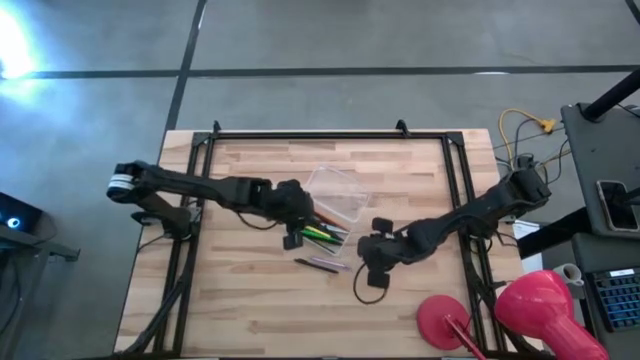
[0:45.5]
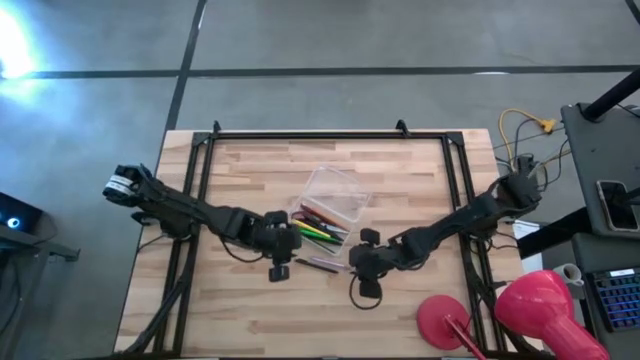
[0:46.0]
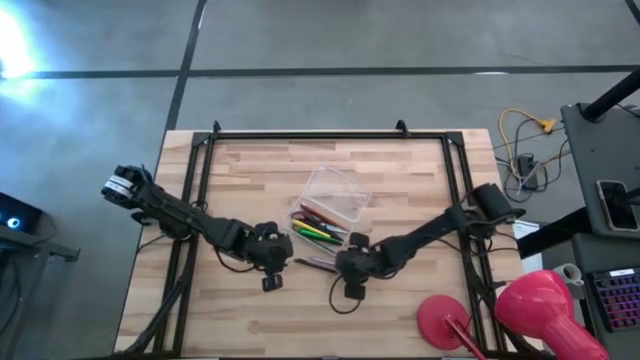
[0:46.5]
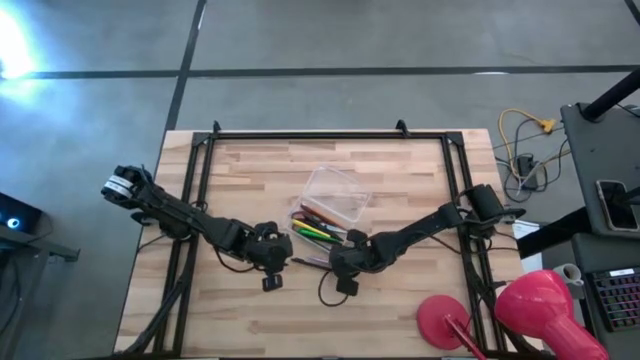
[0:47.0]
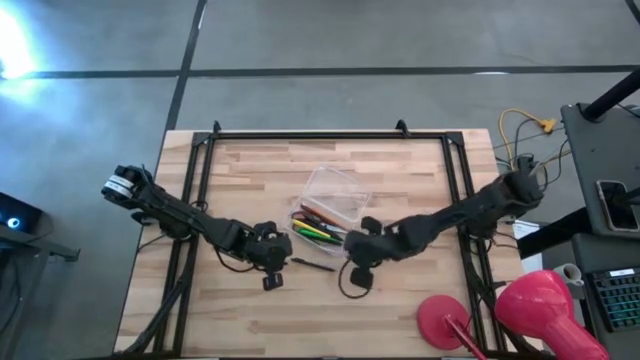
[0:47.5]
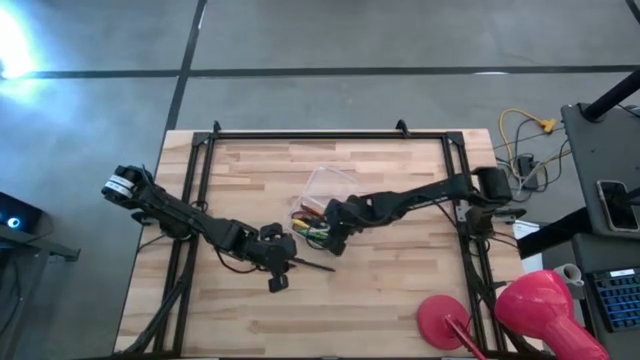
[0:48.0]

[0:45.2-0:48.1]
Task: Pick & place school supplies into a supply box
Put the purple pen into the transparent case

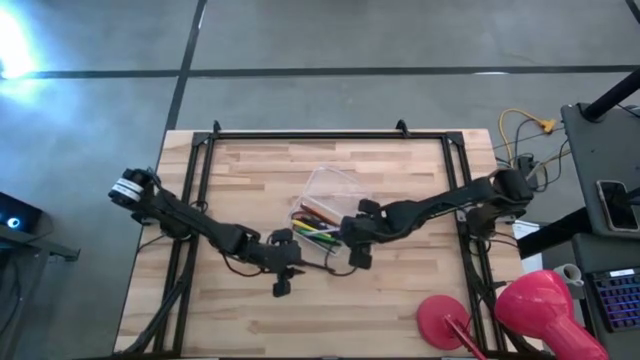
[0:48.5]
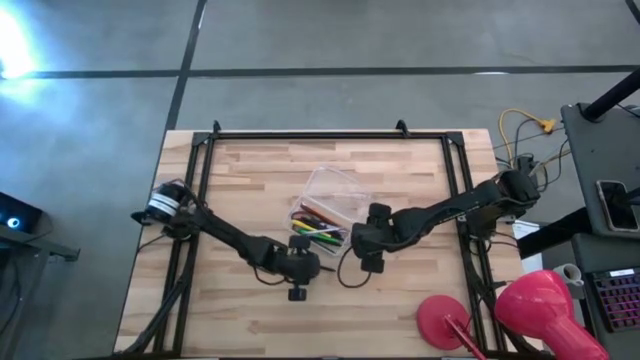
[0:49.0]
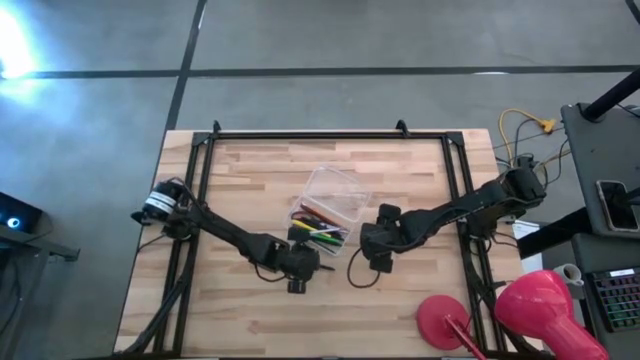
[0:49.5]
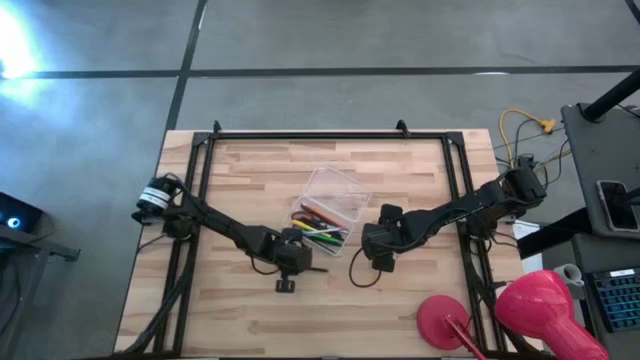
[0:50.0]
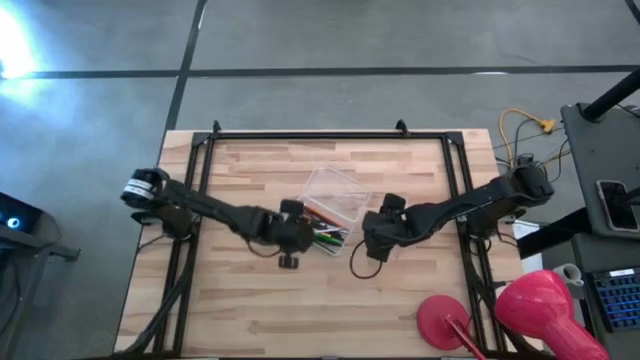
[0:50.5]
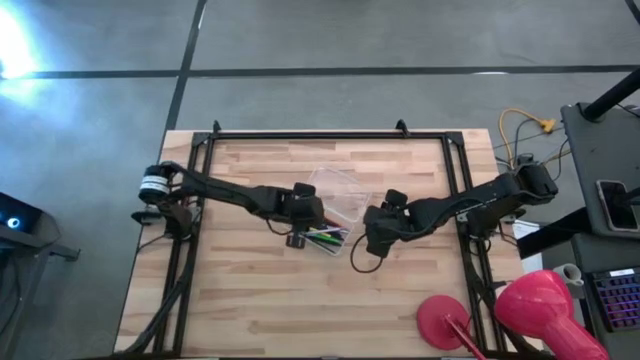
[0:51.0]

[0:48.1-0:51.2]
Put the black pen into the transparent case

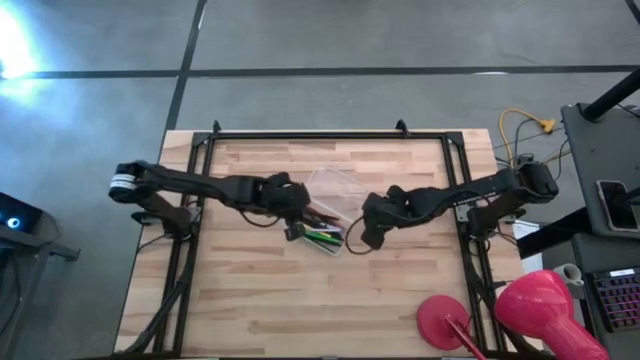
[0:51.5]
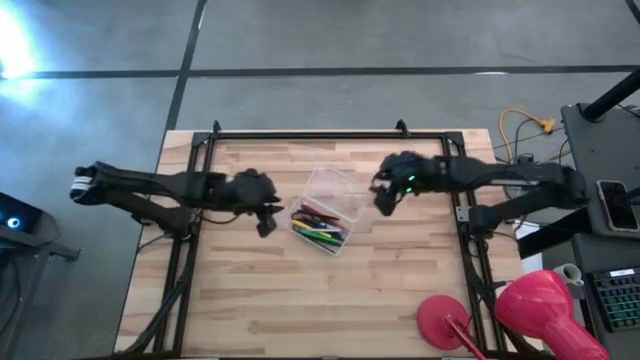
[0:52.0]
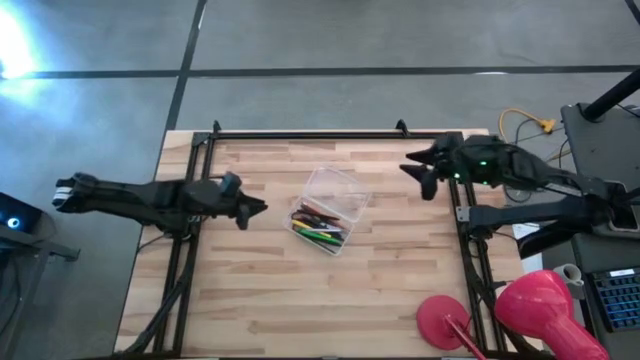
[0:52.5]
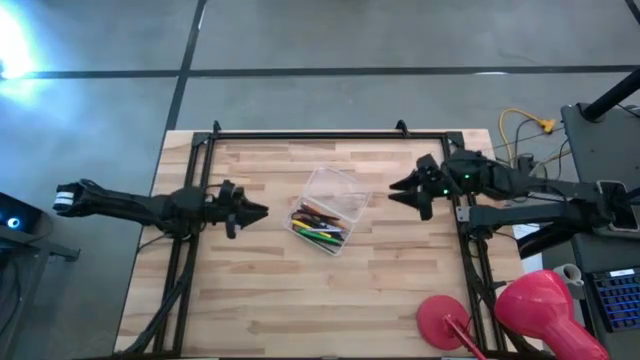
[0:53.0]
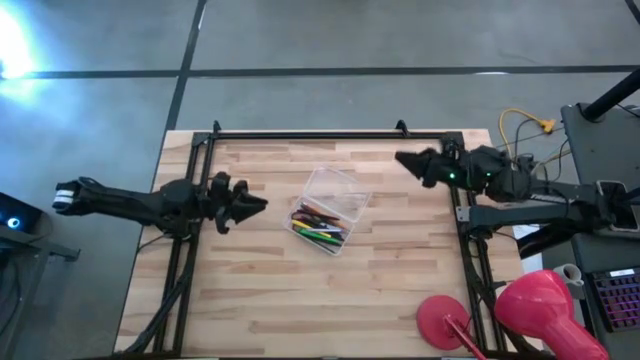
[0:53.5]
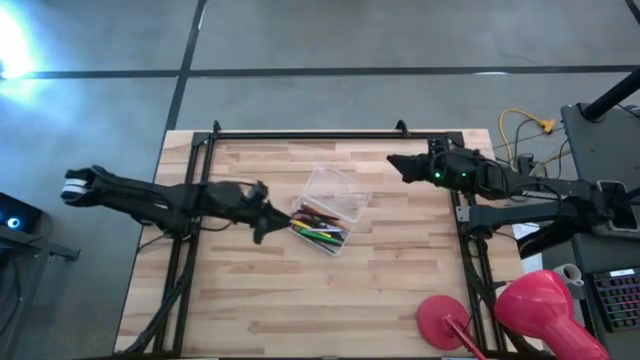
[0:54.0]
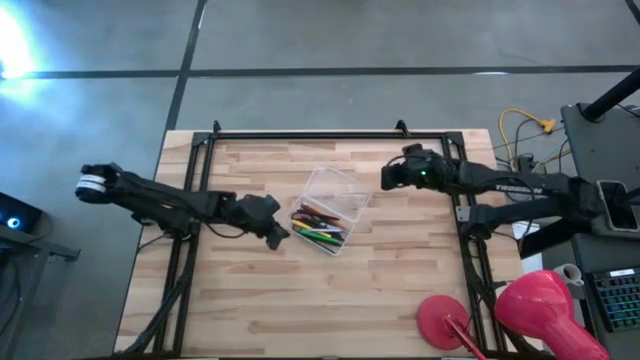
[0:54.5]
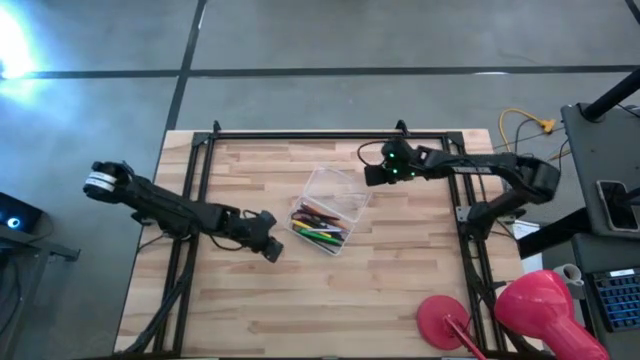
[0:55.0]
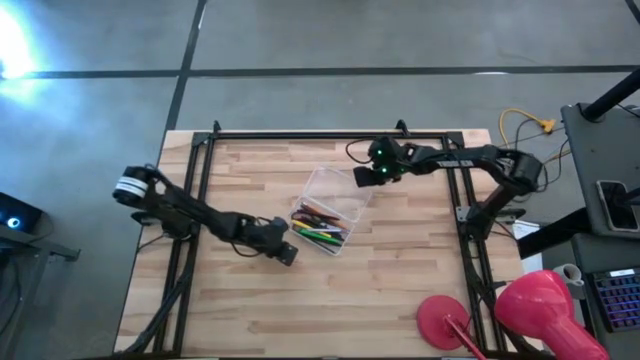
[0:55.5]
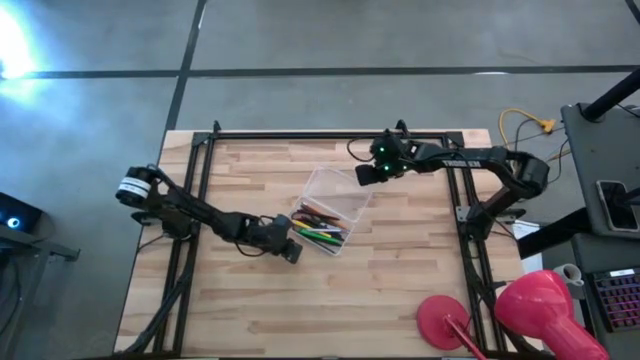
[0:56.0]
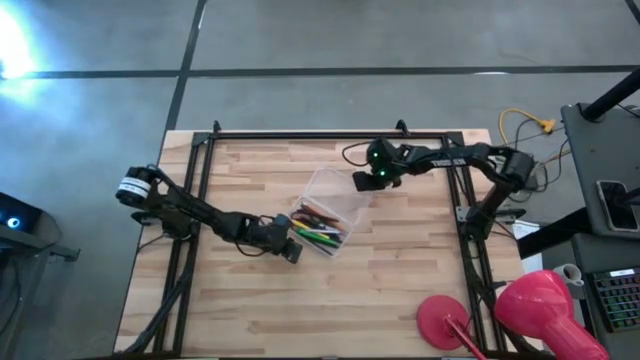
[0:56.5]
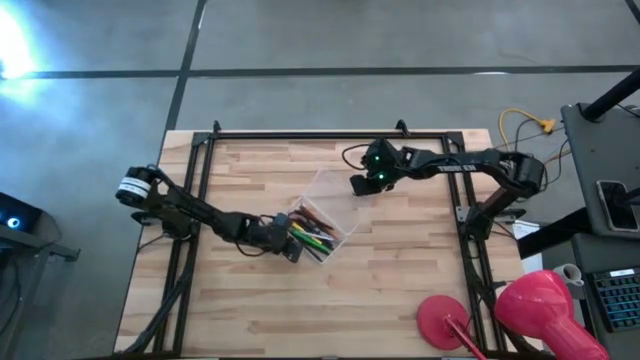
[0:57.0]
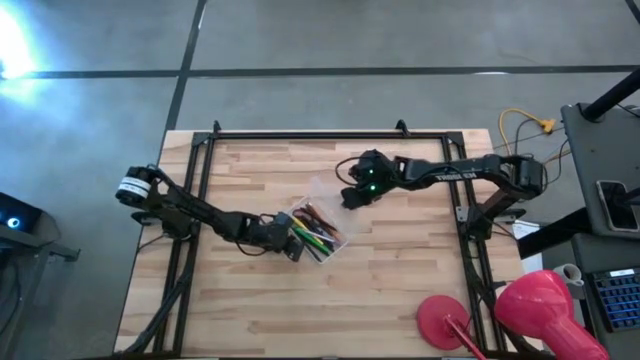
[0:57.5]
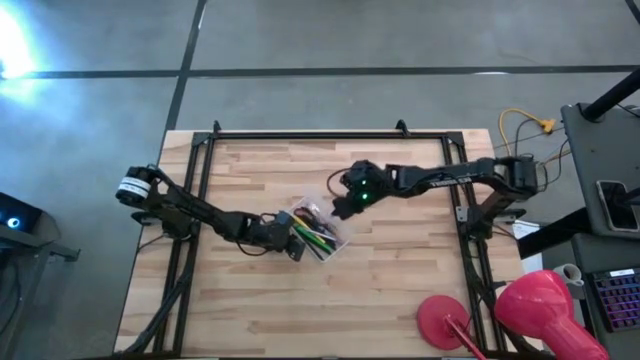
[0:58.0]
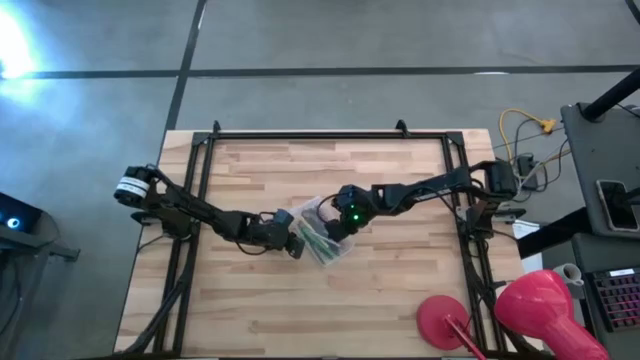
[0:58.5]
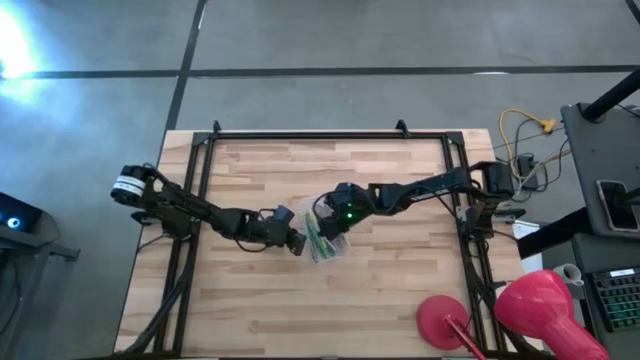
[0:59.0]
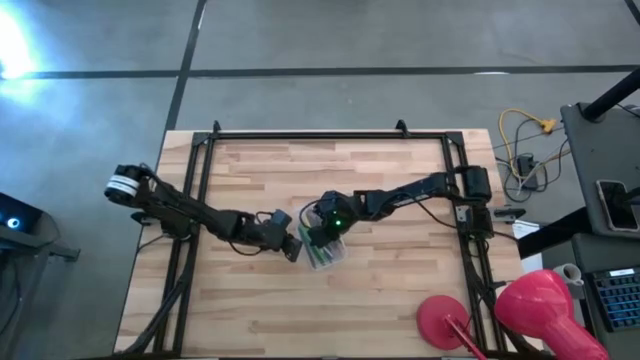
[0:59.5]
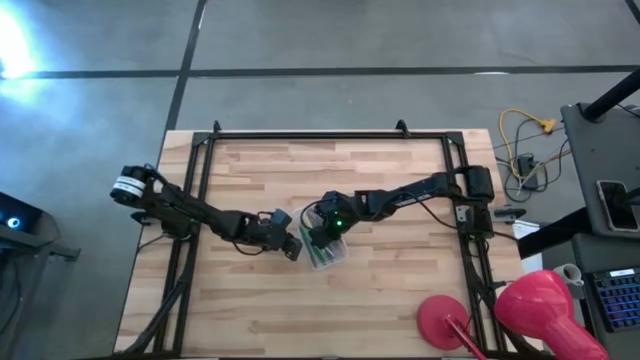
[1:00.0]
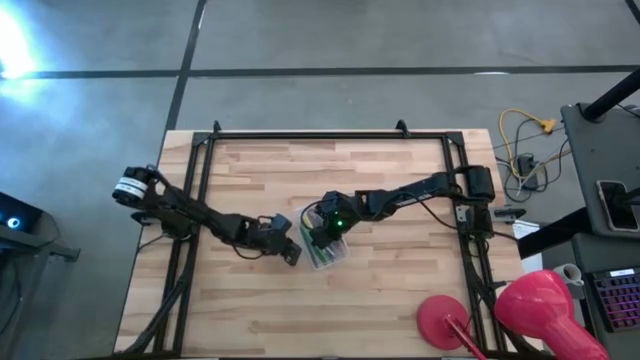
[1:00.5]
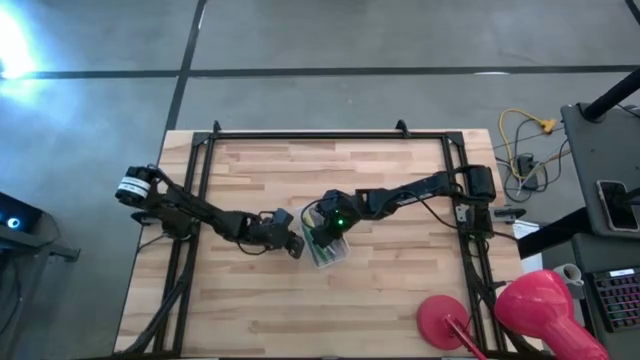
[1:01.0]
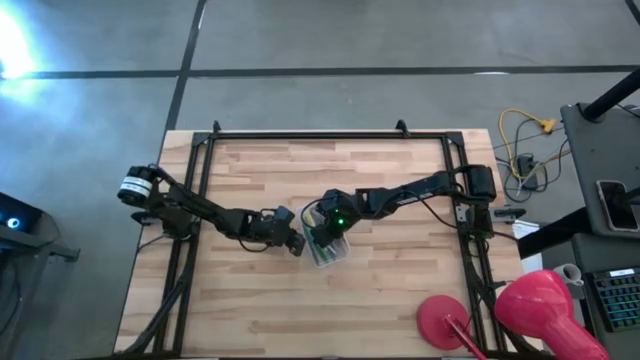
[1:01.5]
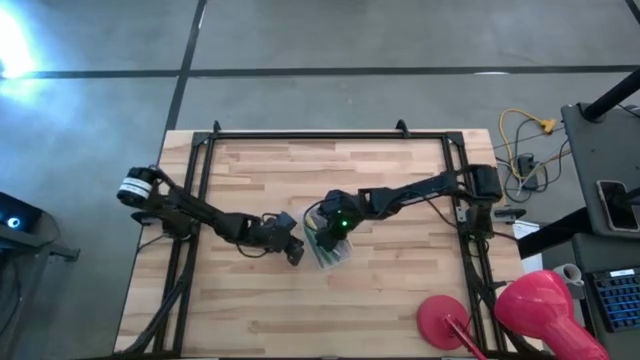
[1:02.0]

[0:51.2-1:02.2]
Close the transparent case

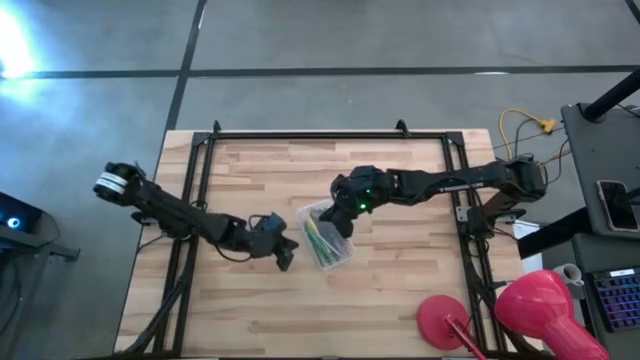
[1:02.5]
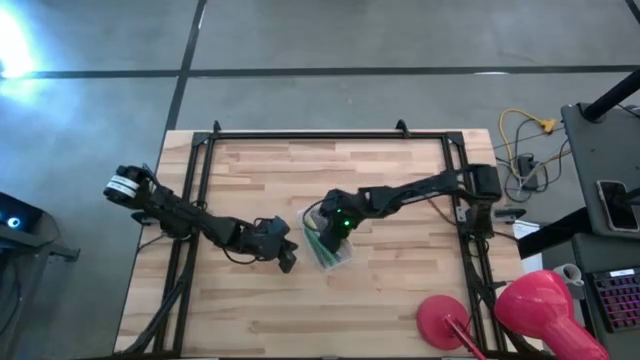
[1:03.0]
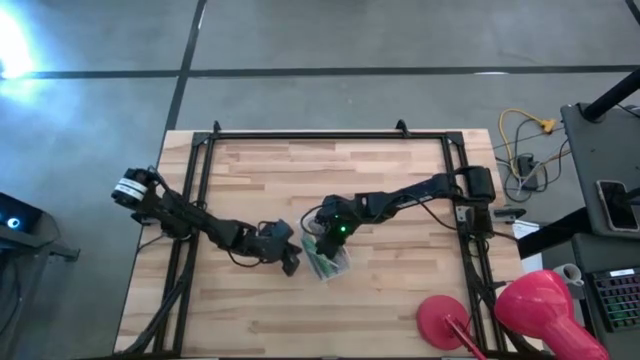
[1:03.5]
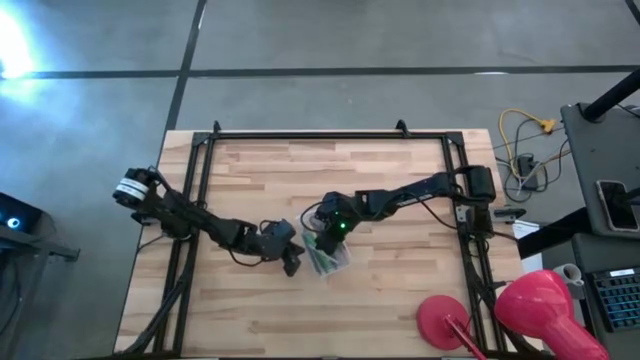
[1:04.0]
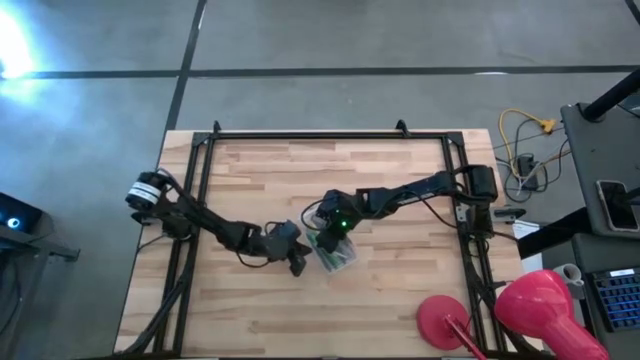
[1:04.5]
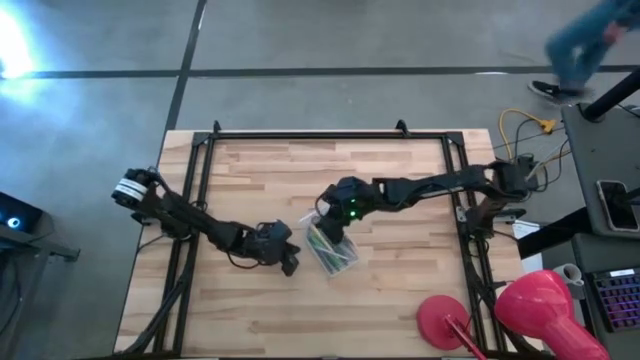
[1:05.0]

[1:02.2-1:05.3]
Close the transparent case
